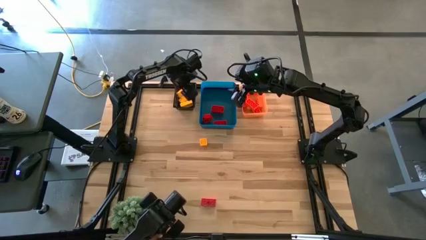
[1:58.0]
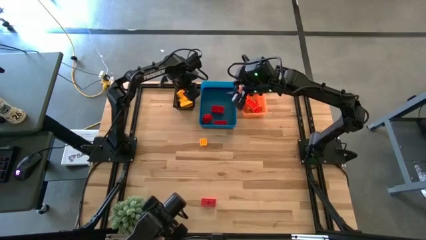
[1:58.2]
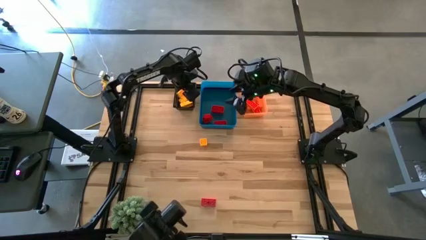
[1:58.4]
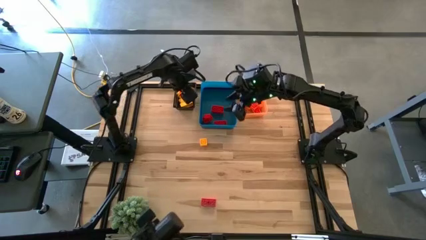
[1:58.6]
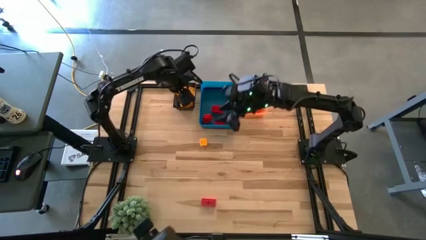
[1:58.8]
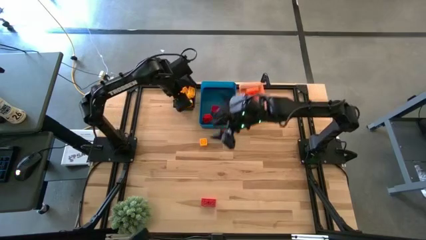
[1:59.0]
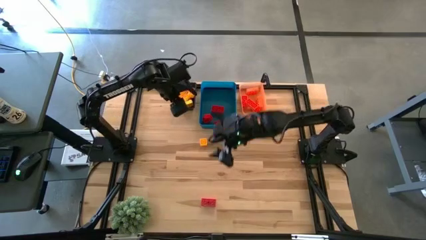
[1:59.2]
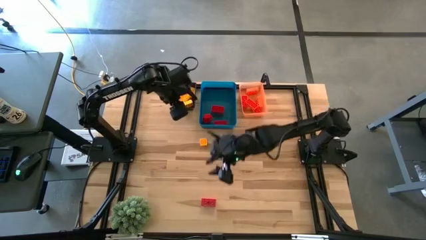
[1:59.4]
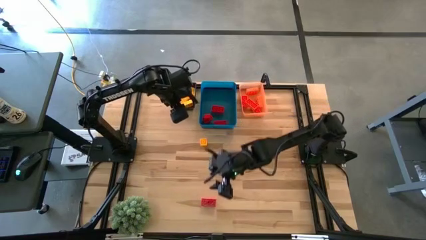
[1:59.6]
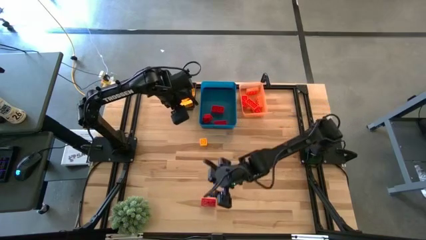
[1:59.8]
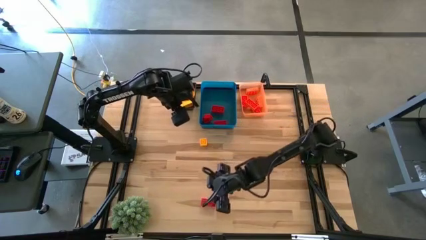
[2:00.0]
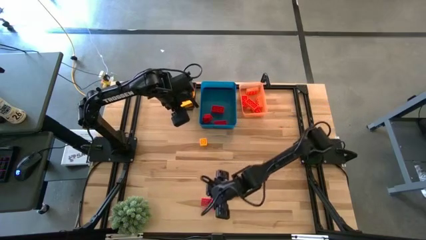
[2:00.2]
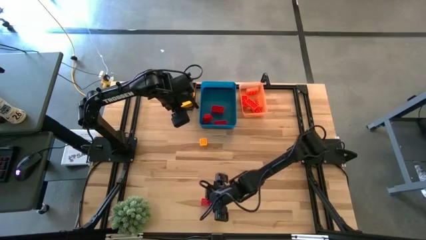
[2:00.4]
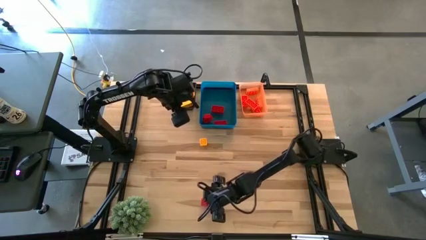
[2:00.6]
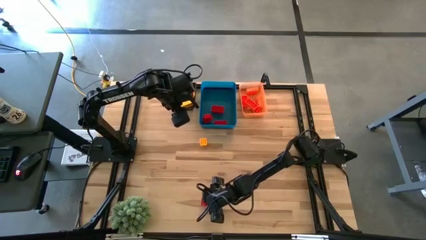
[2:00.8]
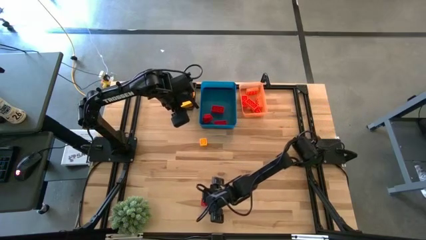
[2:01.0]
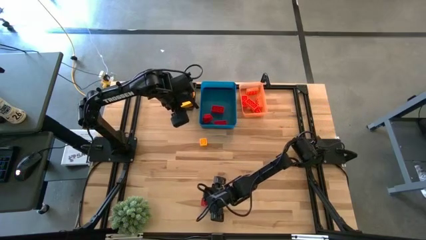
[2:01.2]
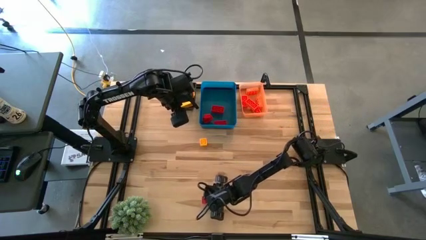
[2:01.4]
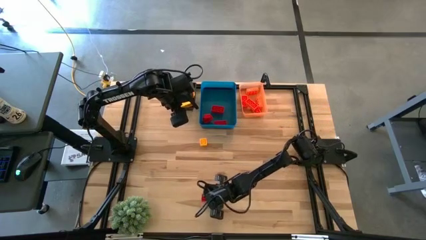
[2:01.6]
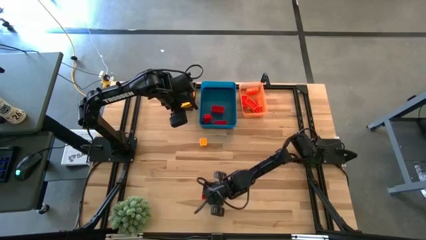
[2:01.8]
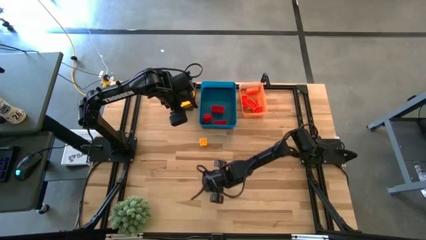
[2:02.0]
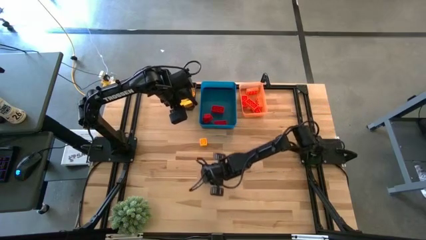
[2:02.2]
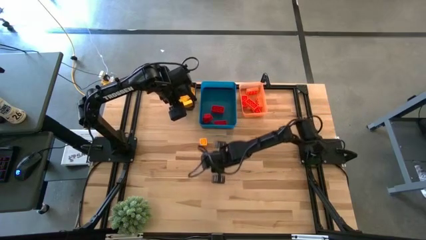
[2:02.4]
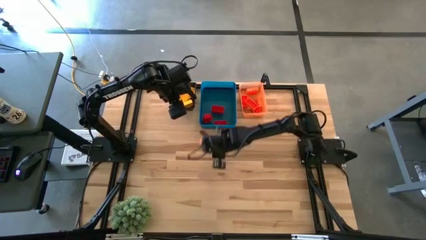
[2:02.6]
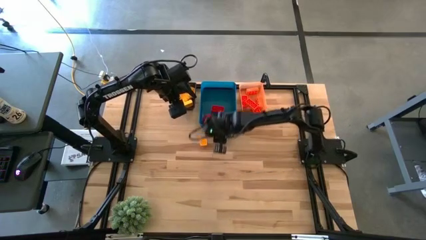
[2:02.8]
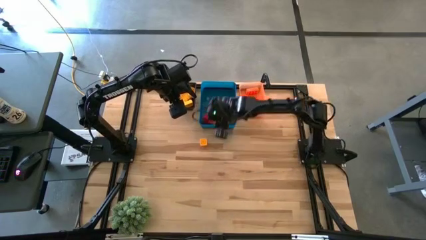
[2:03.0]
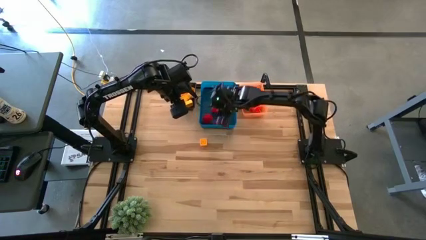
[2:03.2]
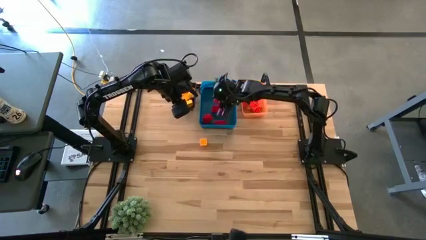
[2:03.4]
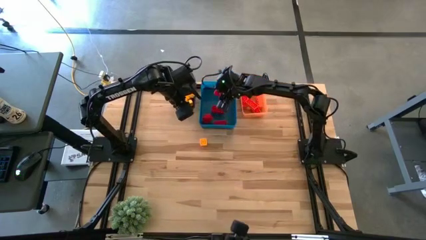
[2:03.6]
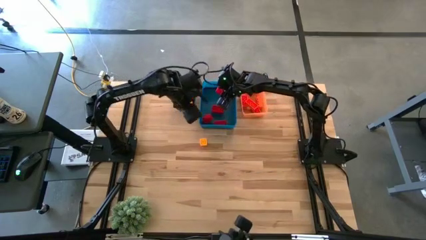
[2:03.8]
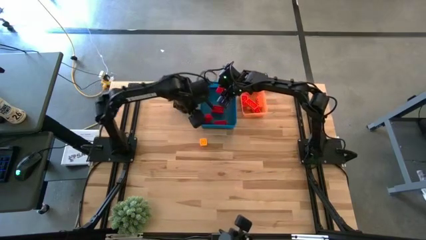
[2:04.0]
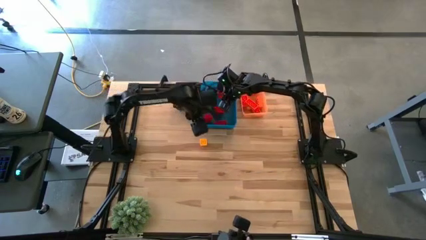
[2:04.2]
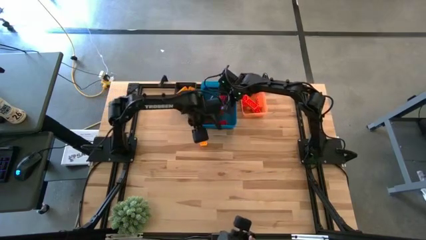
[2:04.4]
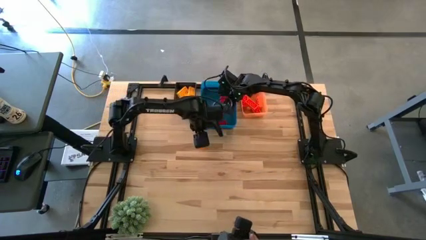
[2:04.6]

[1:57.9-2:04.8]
Task: Sort & place blocks by color
Put the red game piece into the blue bin

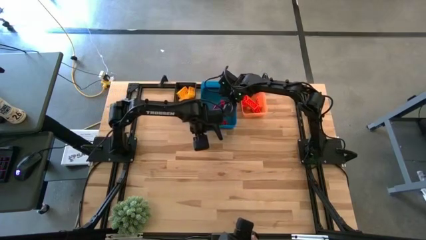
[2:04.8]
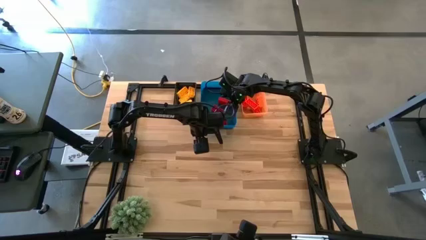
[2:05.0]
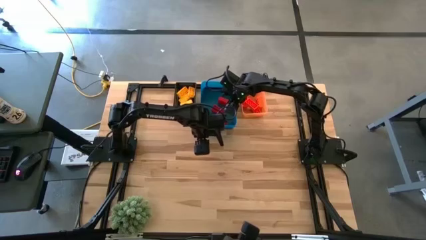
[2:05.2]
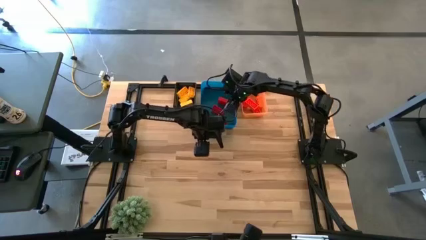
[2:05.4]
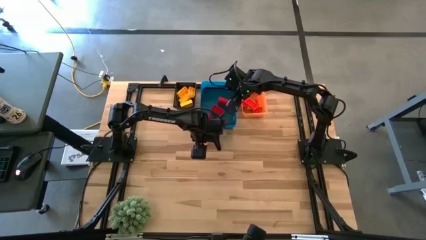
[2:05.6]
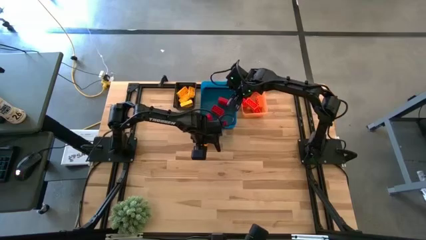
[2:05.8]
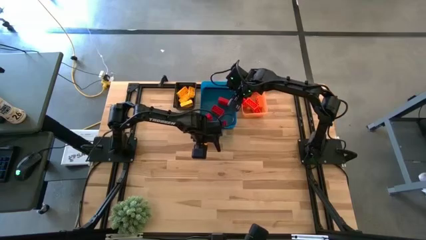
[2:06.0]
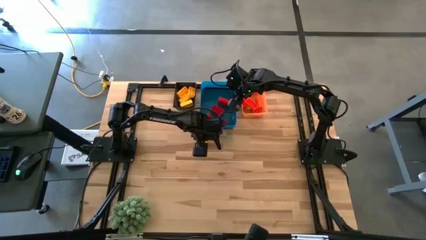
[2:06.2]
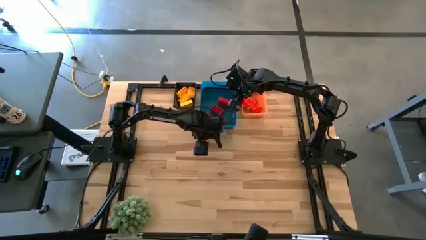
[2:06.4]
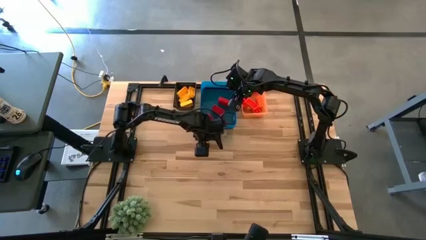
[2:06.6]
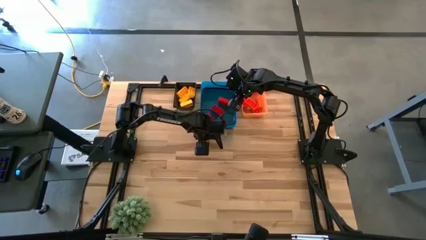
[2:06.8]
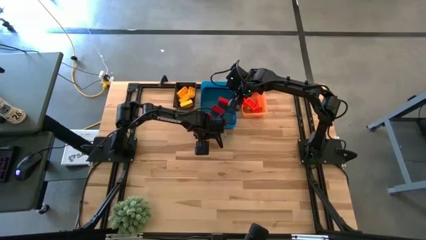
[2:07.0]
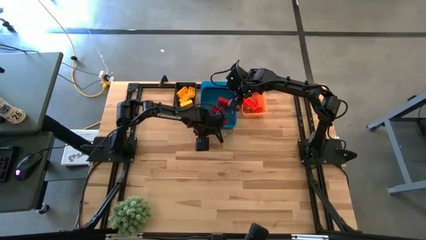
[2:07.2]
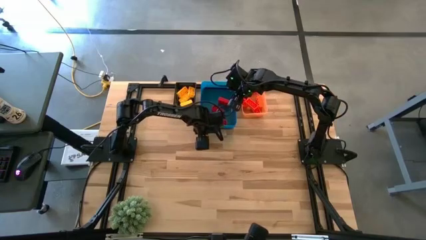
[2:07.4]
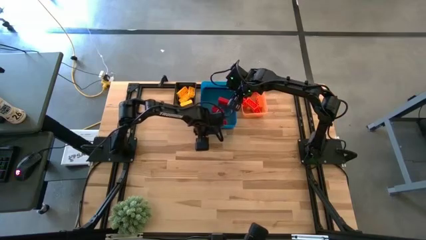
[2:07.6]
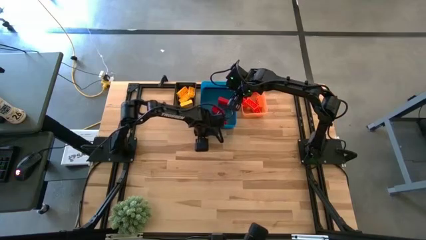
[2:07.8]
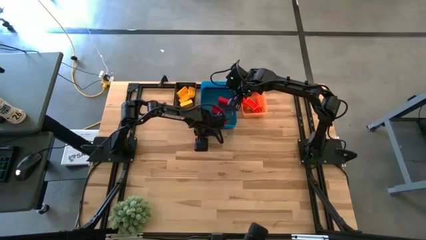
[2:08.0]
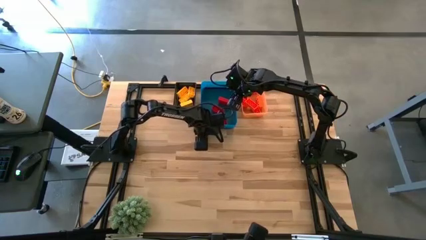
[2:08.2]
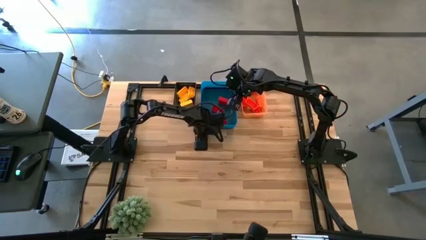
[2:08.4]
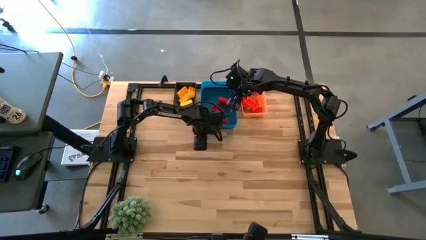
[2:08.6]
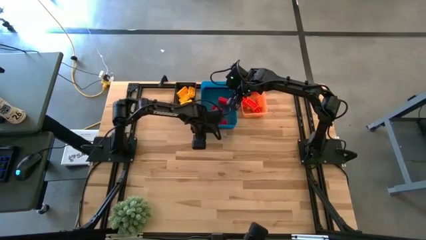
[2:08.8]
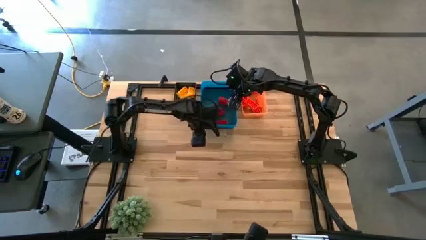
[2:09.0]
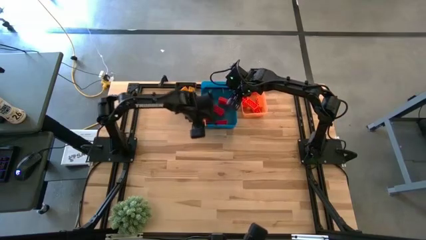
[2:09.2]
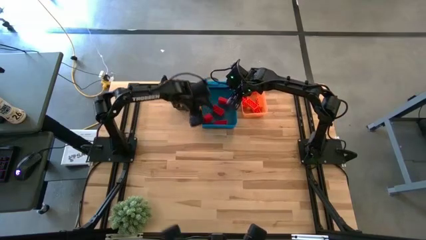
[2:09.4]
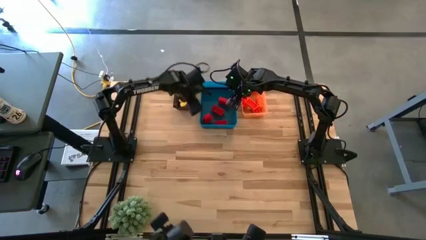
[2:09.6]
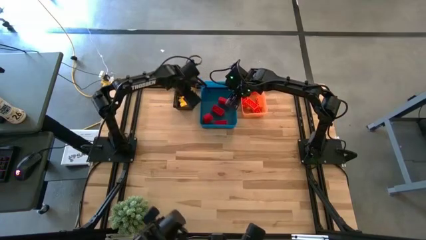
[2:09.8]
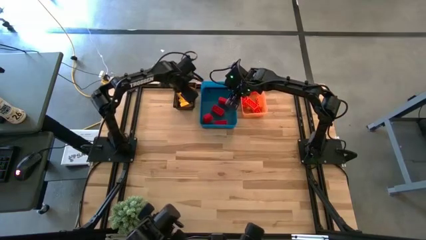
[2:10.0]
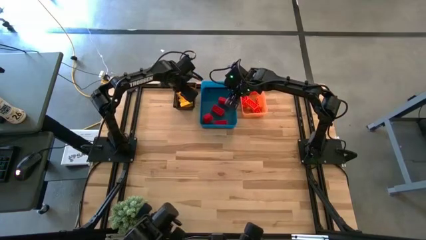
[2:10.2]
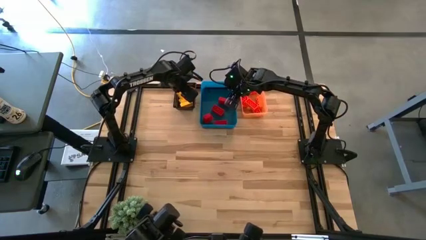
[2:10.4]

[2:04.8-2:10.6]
Put the yellow game piece into the black bin
